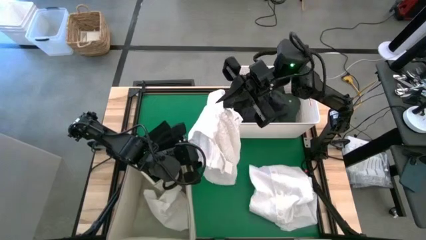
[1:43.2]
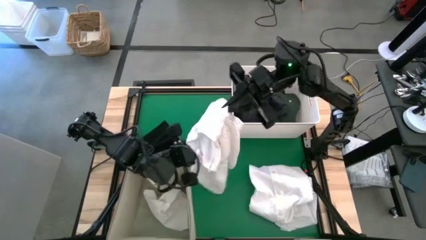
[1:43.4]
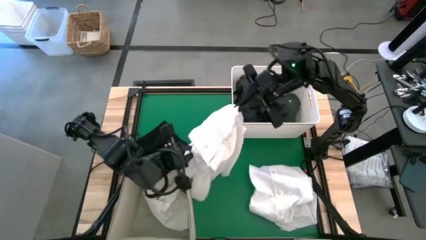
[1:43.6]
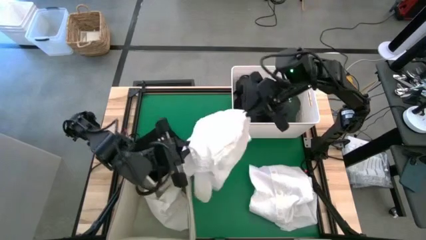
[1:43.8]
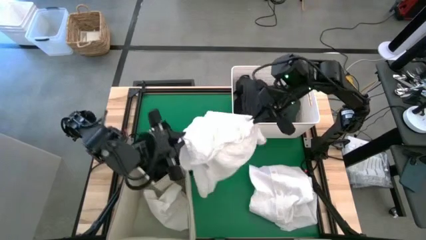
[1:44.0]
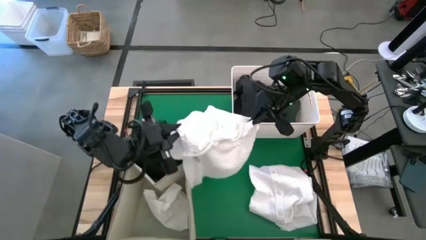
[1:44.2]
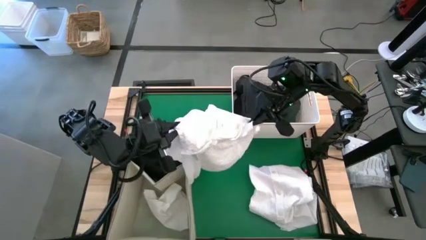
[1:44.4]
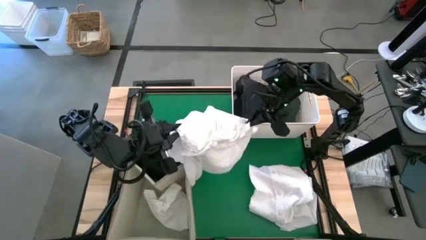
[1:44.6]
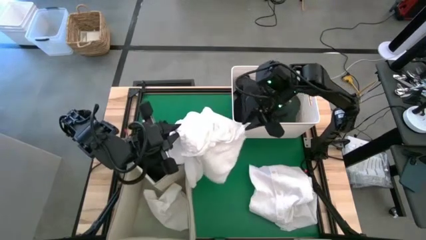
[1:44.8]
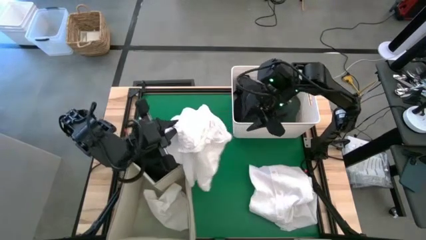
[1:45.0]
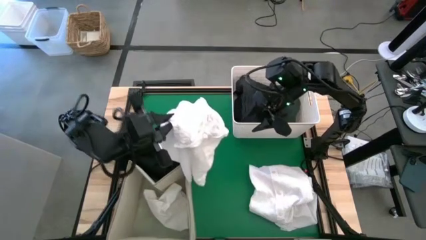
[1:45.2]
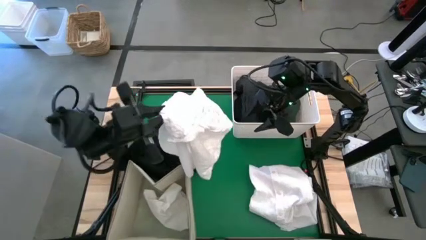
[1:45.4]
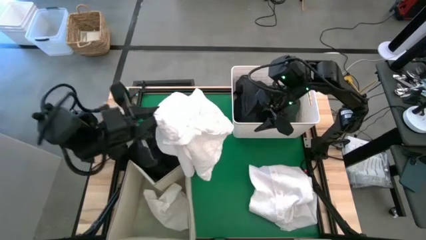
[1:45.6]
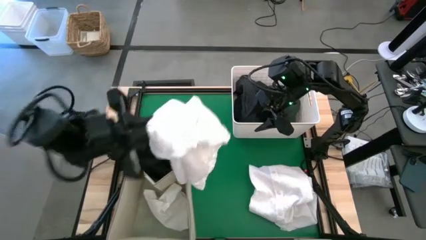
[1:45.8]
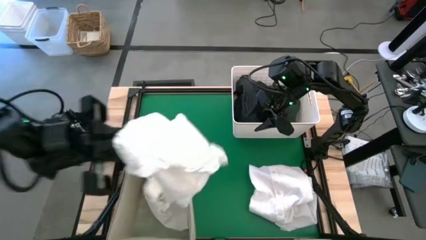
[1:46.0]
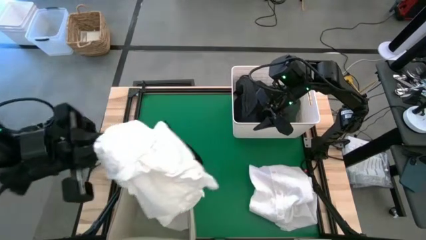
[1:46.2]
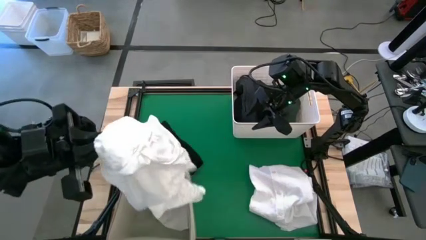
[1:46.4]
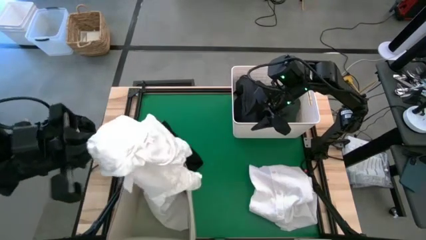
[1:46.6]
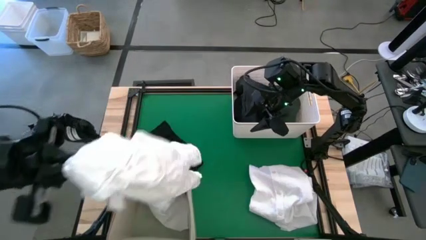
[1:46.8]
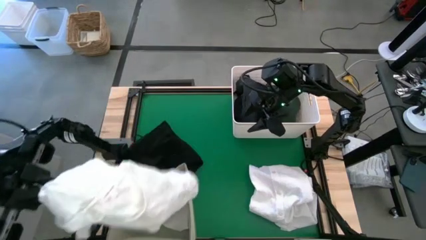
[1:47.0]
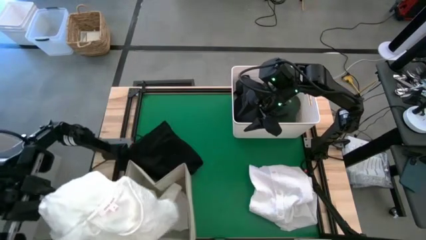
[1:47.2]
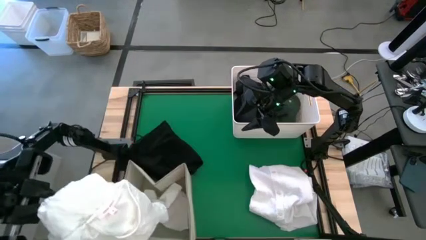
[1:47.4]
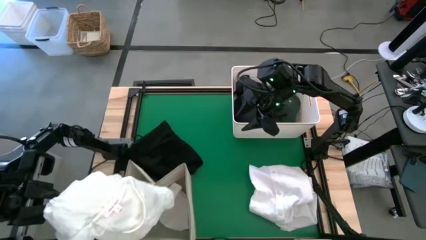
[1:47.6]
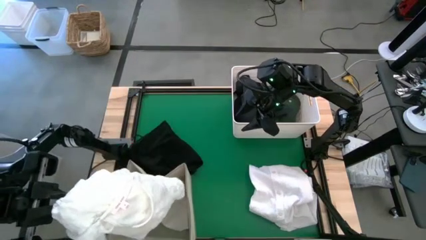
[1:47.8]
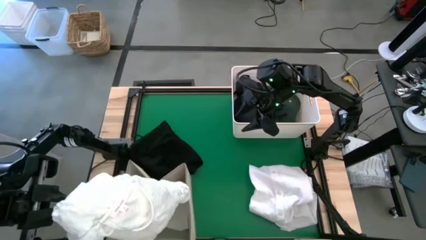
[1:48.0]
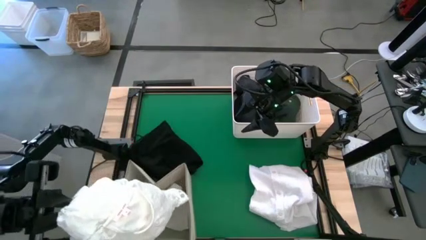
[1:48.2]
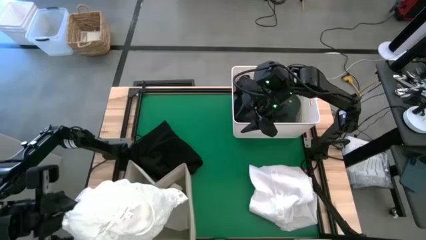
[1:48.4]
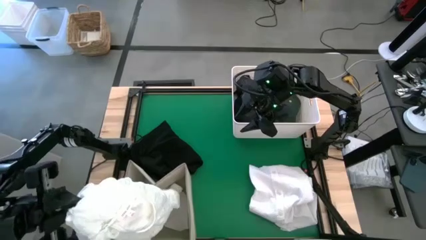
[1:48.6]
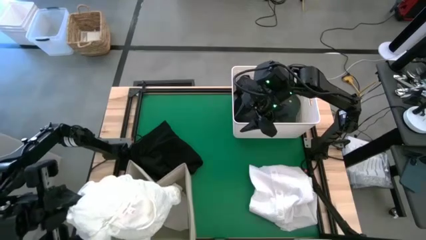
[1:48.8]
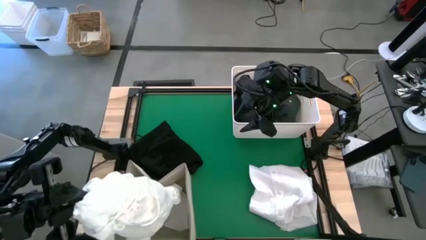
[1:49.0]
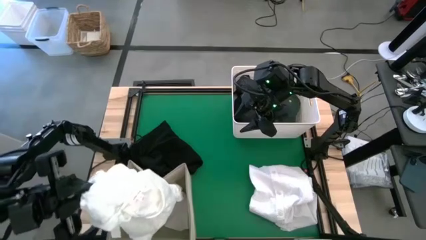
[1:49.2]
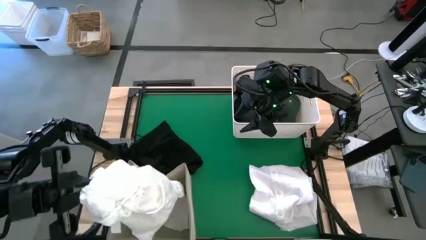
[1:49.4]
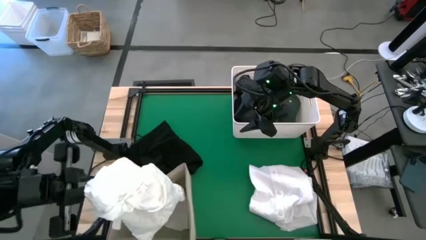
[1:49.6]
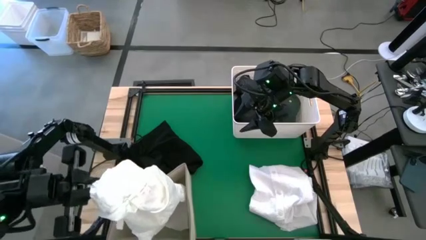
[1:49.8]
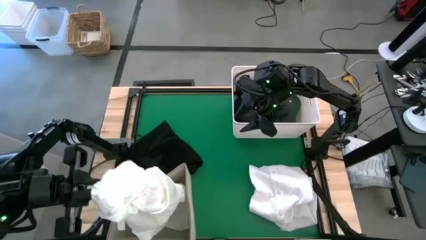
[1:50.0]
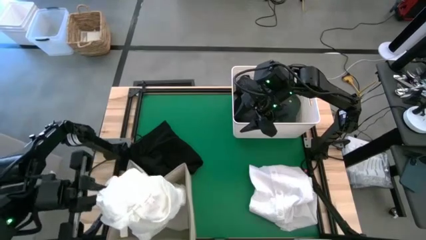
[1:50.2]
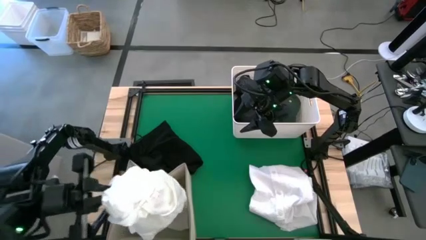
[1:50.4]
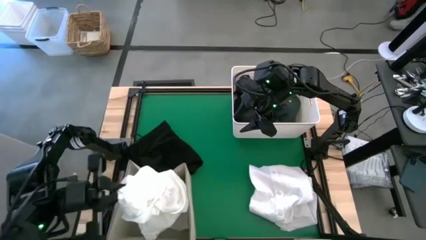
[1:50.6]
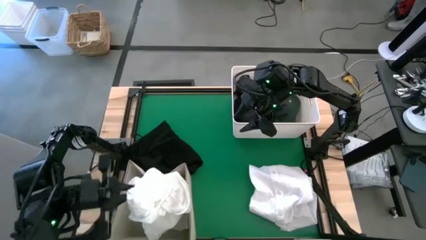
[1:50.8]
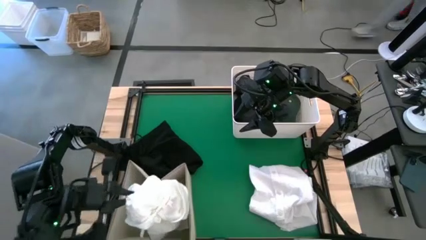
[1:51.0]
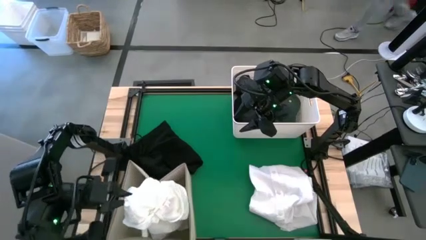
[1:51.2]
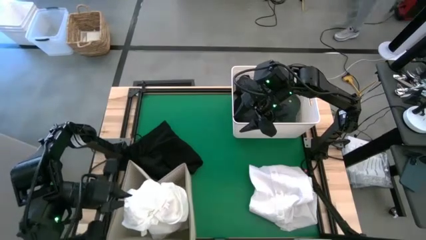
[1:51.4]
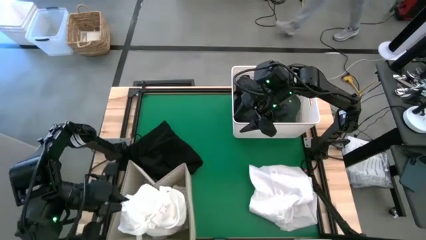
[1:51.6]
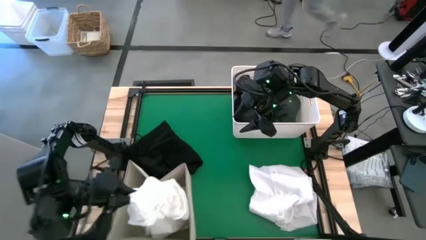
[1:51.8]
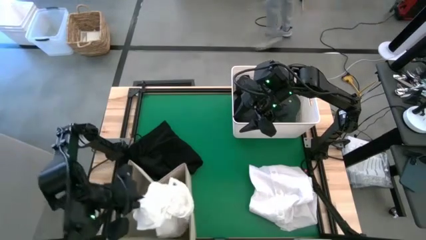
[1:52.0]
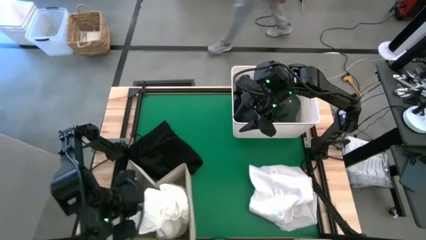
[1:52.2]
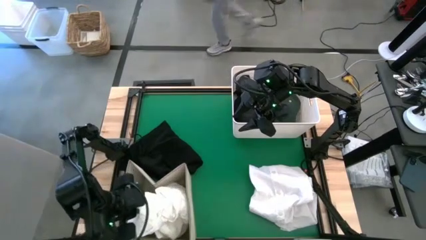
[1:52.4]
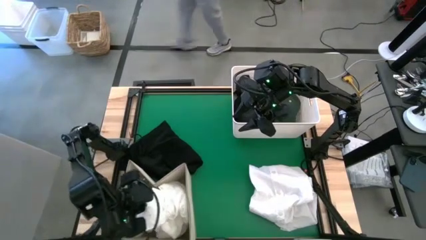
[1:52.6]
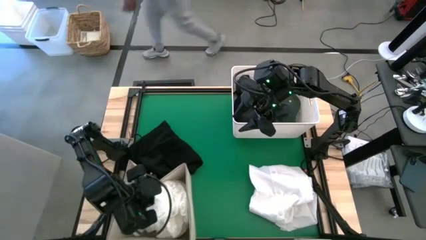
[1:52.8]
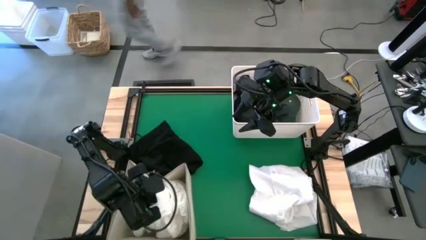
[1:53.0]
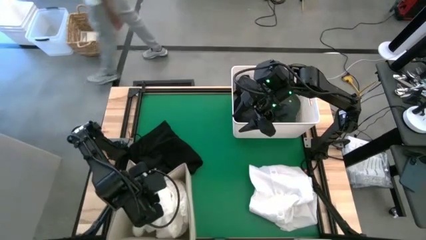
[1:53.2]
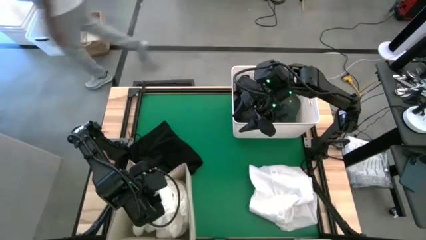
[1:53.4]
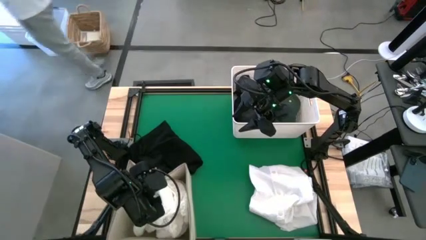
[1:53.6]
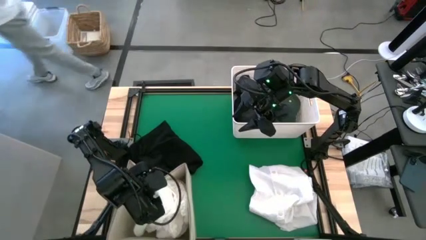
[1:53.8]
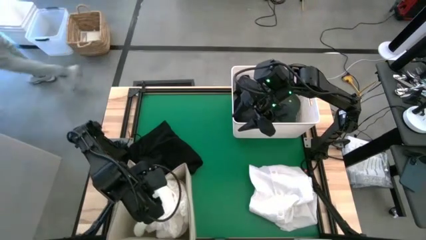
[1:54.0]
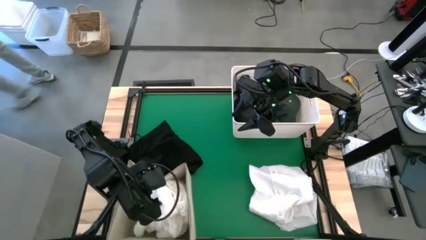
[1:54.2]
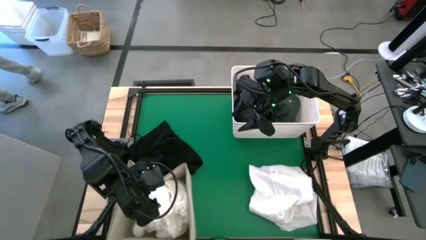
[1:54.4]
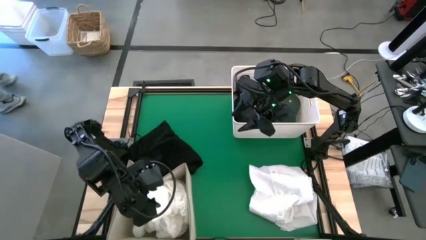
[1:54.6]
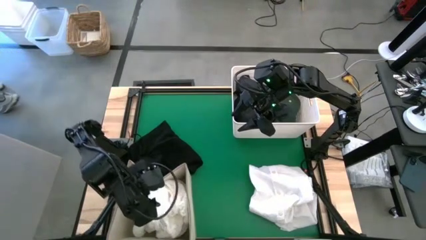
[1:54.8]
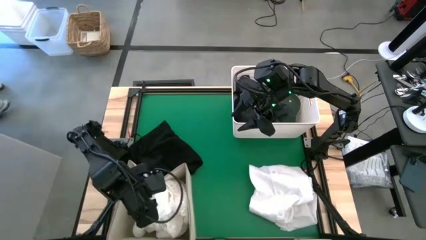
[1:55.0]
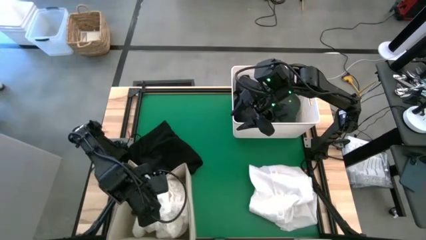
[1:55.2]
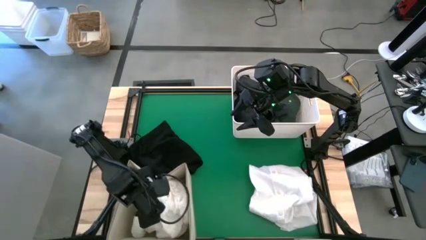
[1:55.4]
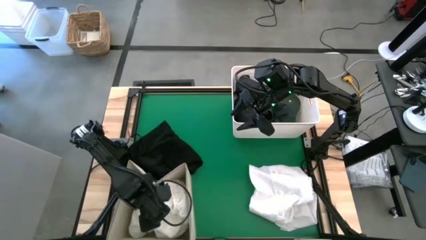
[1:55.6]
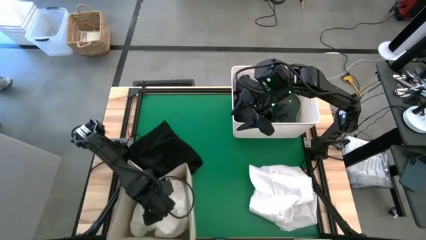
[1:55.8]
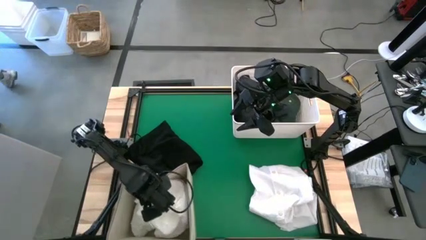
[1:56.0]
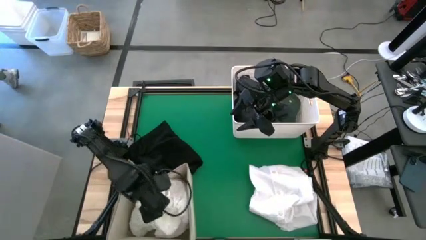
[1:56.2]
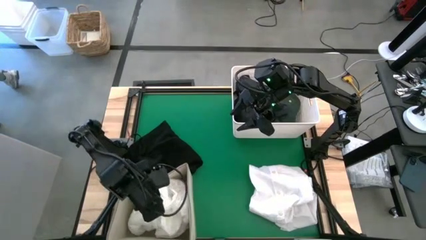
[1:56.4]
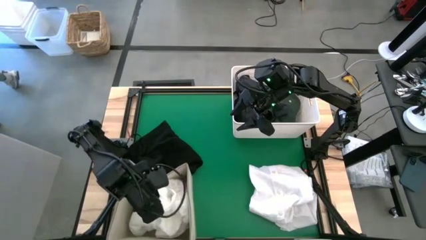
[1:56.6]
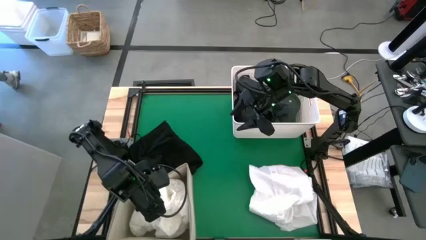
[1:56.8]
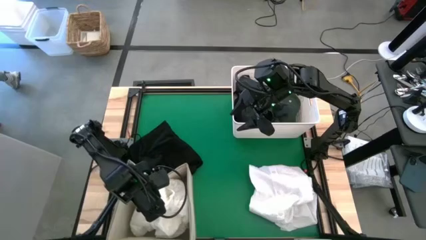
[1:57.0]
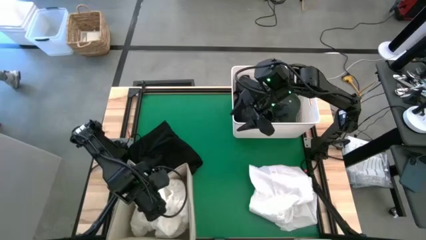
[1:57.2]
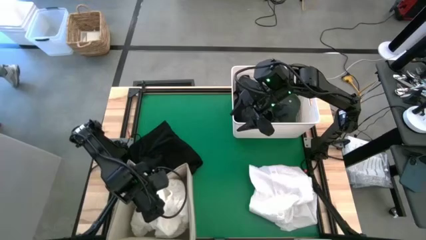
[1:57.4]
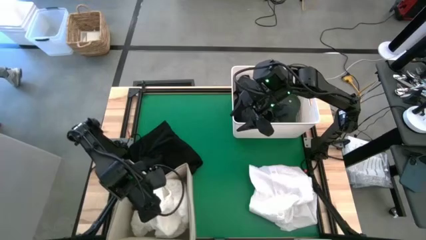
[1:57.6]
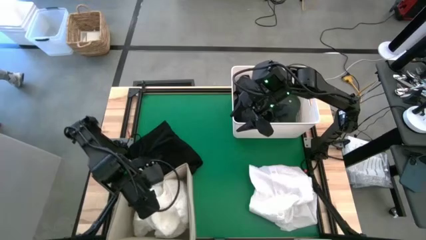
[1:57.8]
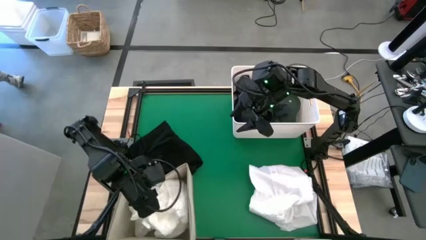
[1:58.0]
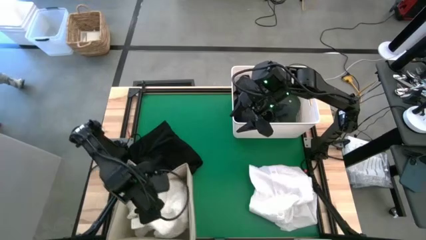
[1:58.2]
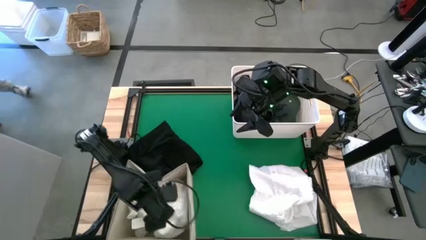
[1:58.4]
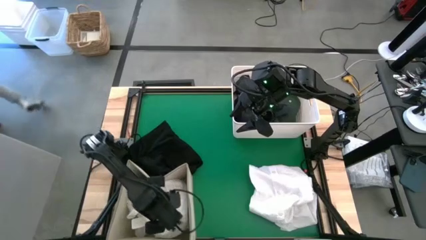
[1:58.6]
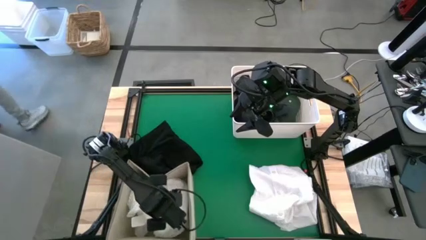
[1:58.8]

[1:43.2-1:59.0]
Task: Sort clothes
Put the white dress into the bottom left white bin
